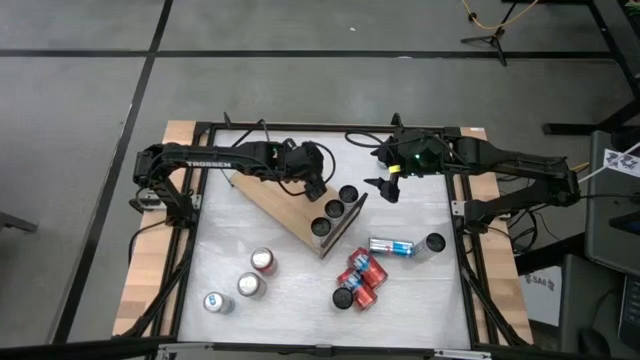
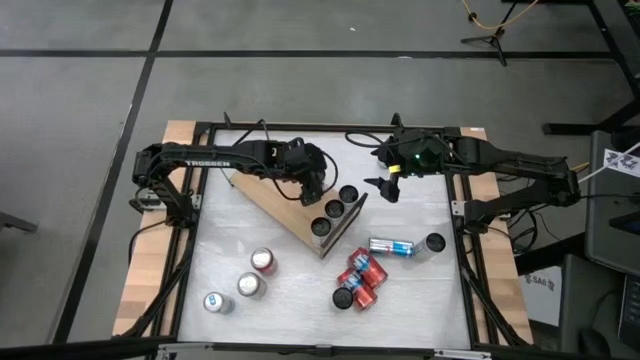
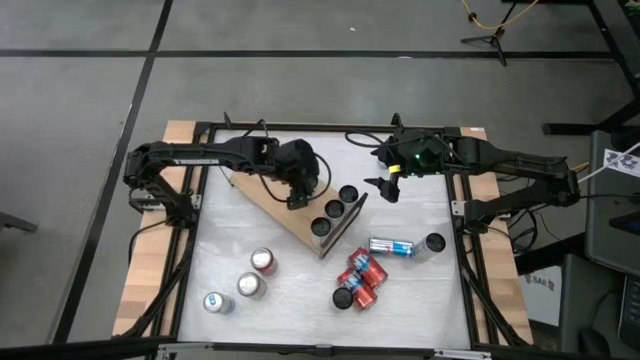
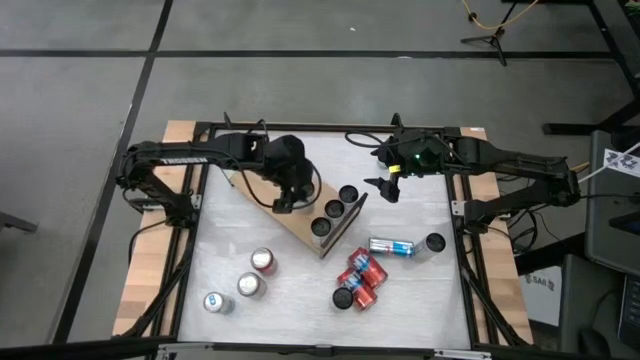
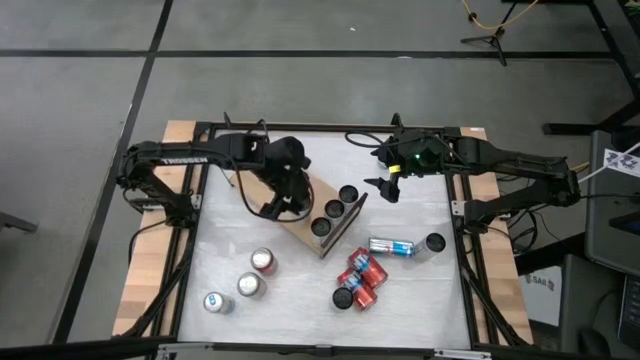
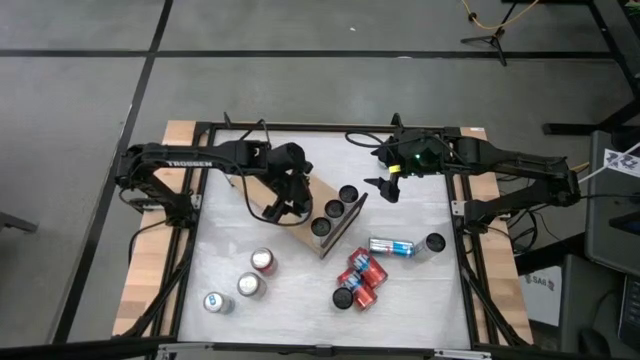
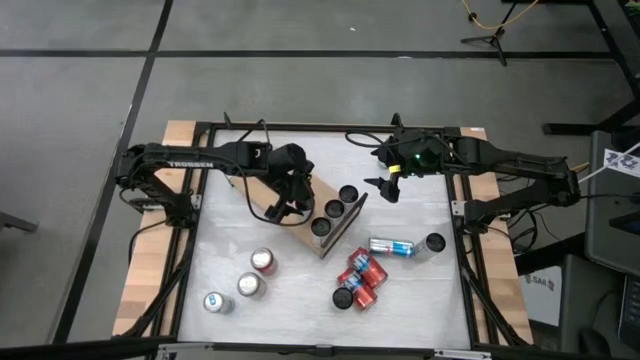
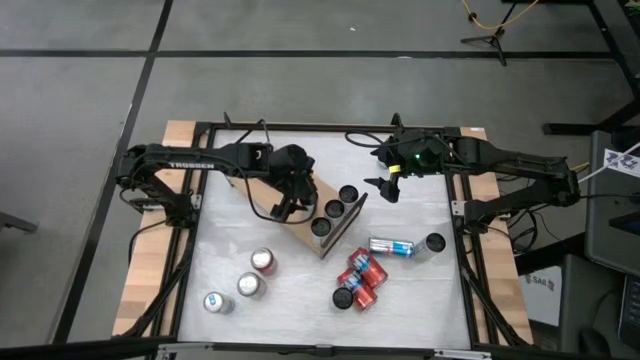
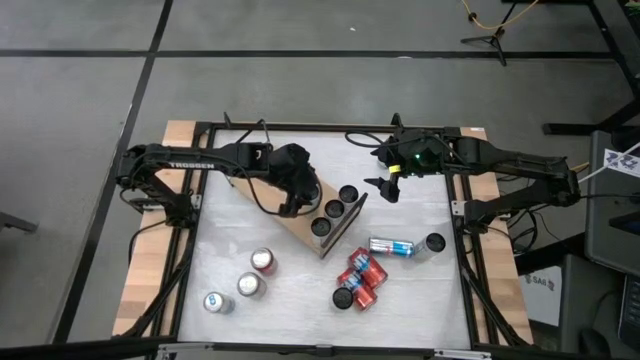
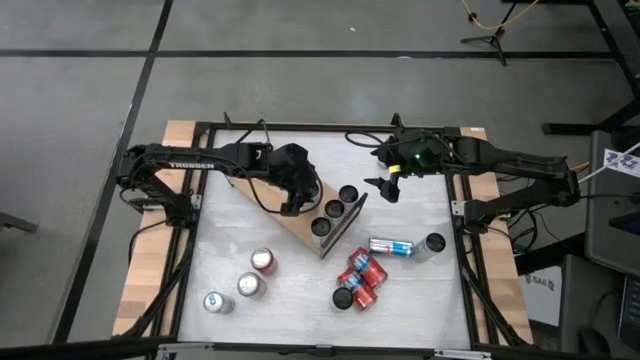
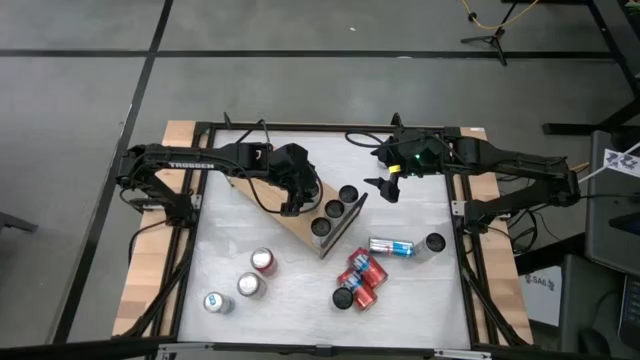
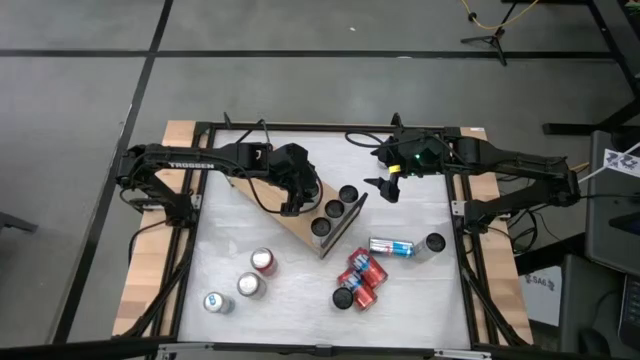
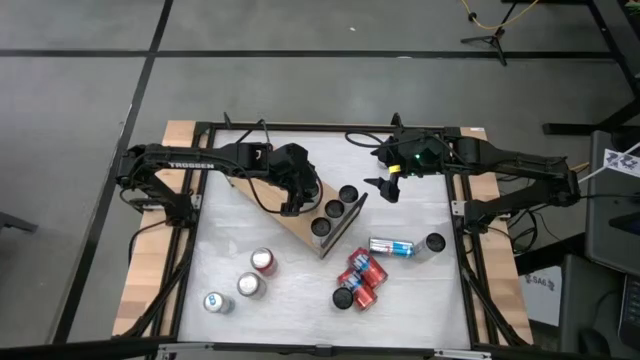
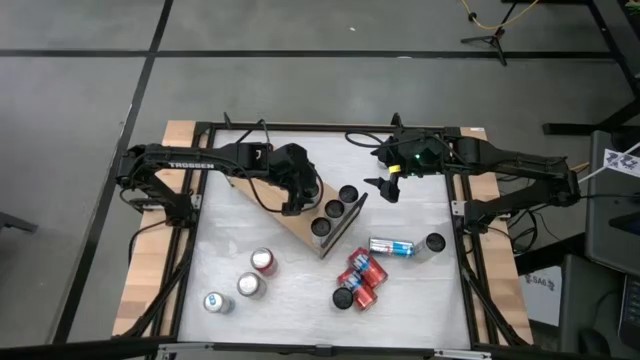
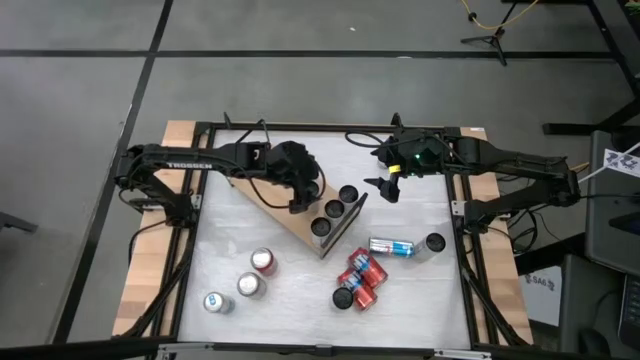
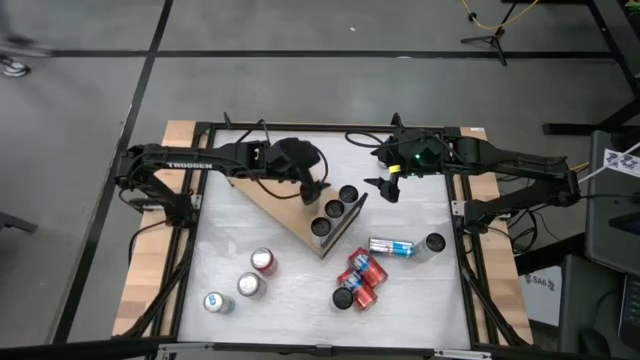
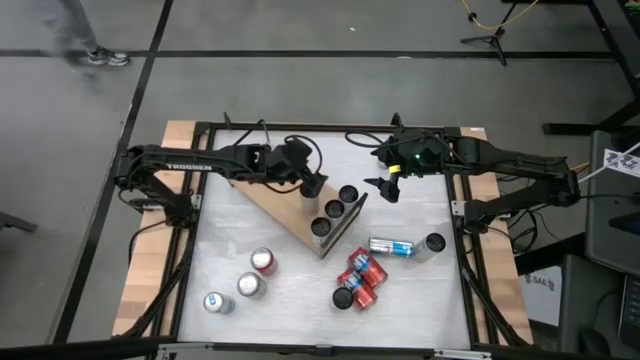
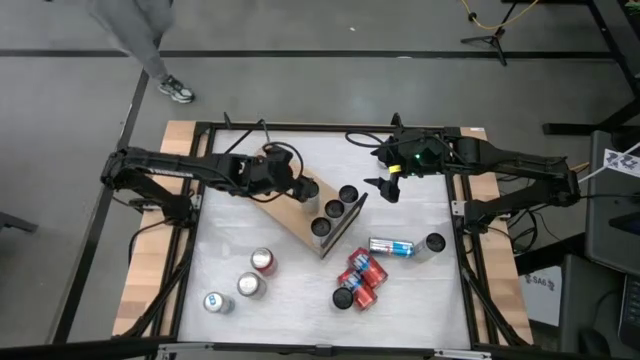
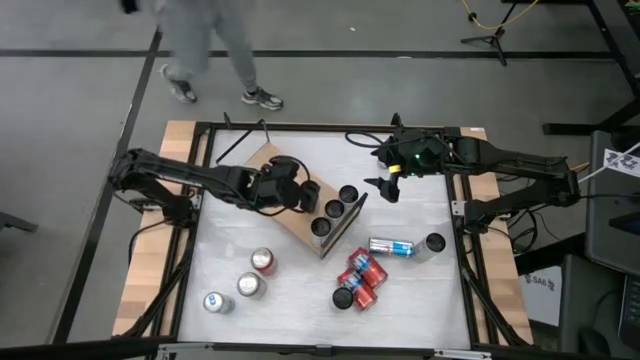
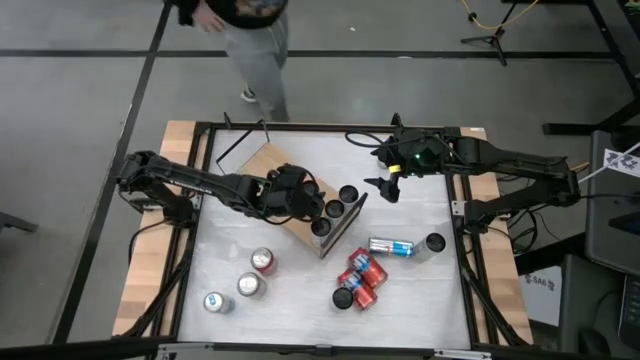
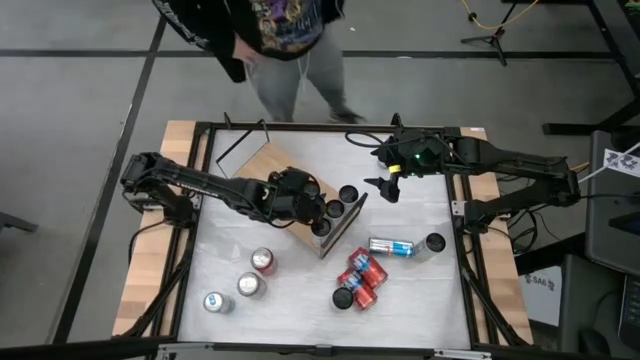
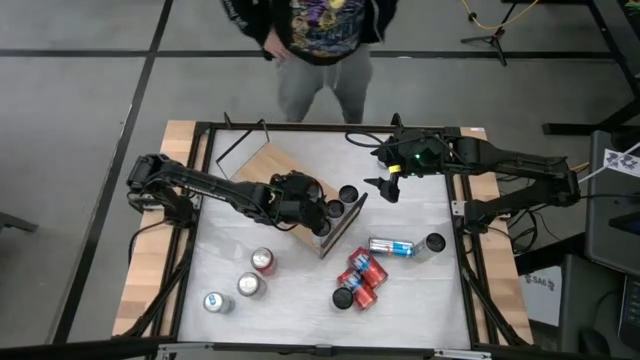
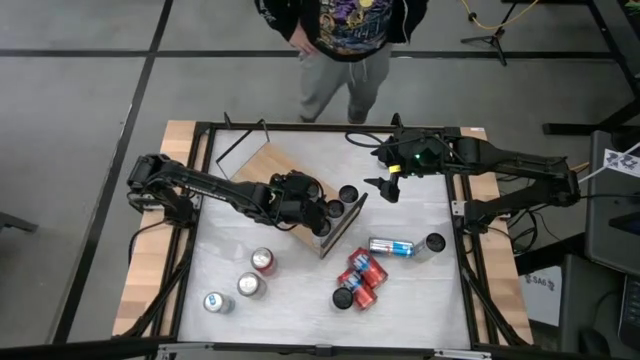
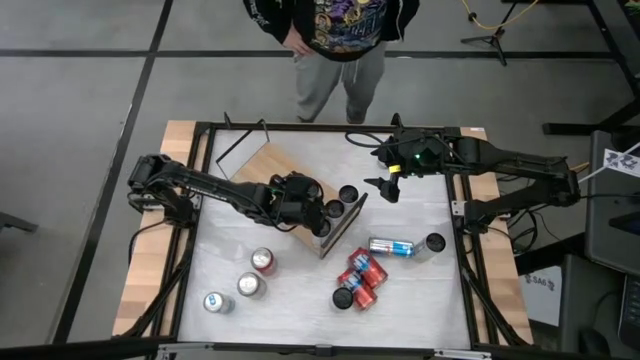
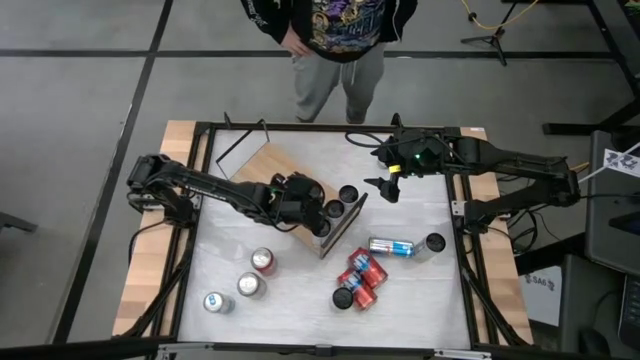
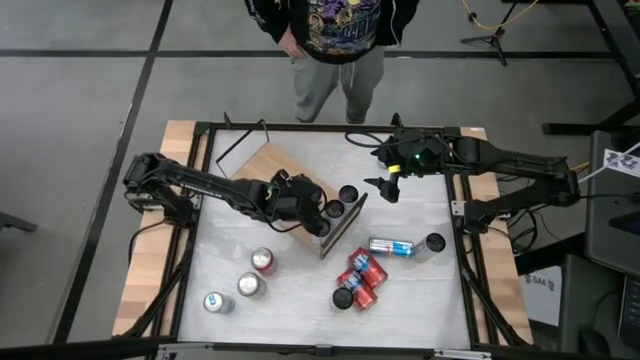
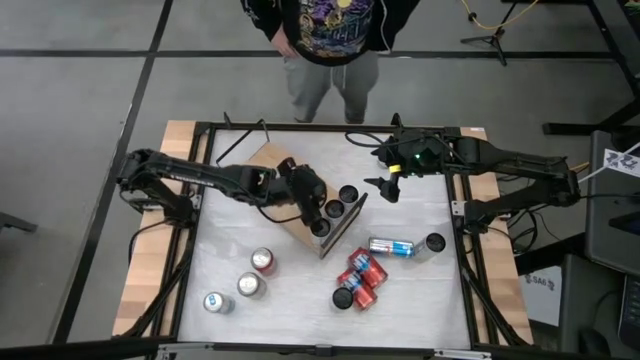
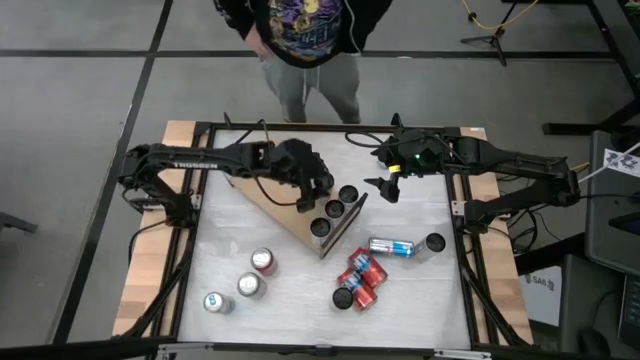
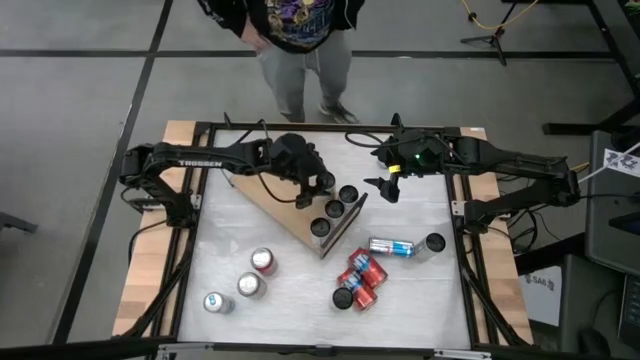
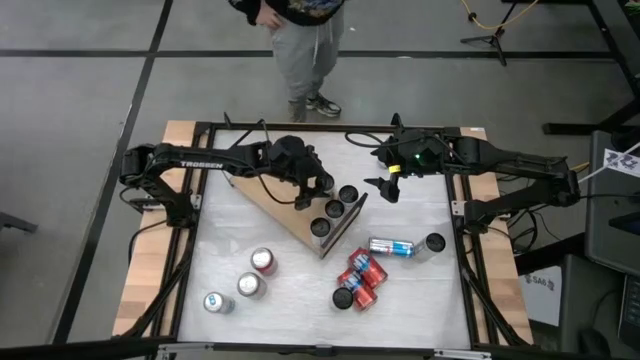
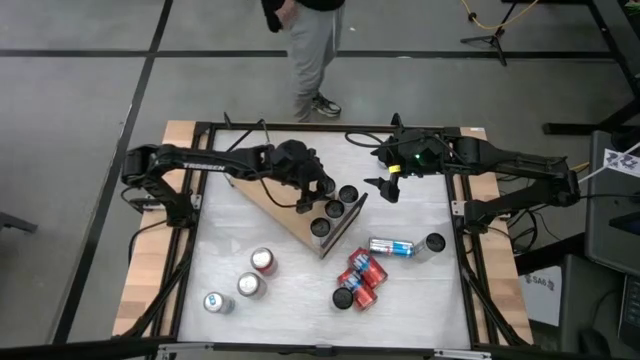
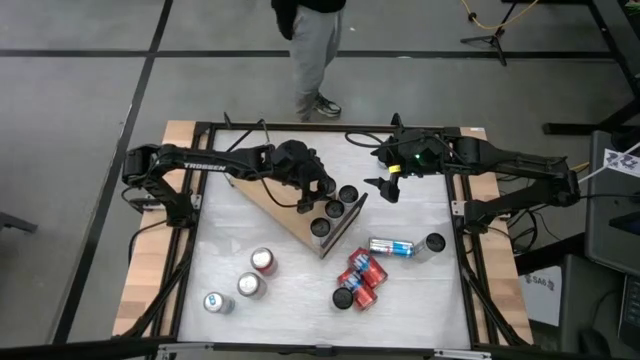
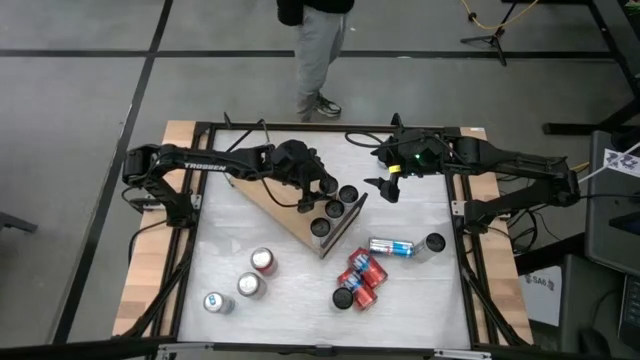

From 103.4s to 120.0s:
Task: Place canned beverage on shelf
Put the top left white-yellow soda can on the shelf
